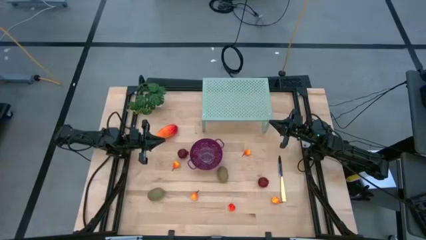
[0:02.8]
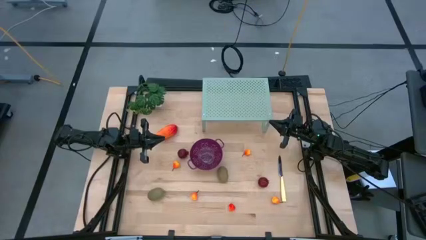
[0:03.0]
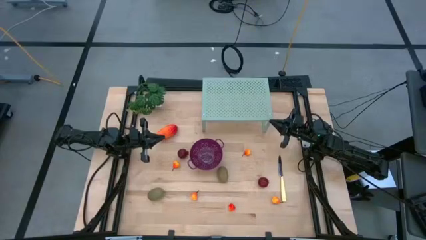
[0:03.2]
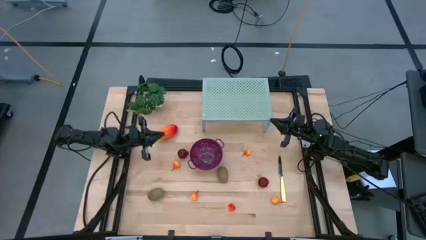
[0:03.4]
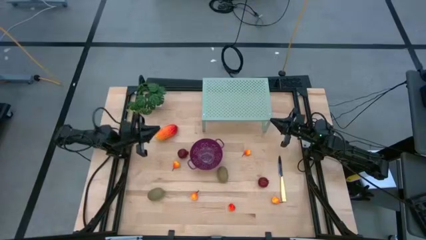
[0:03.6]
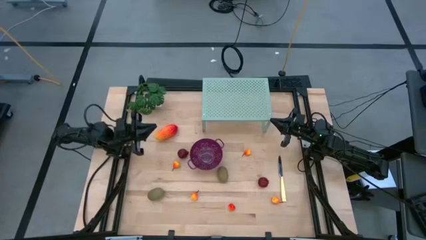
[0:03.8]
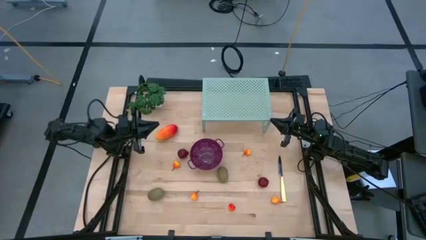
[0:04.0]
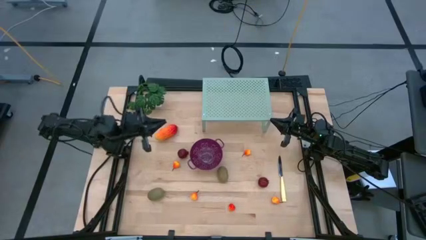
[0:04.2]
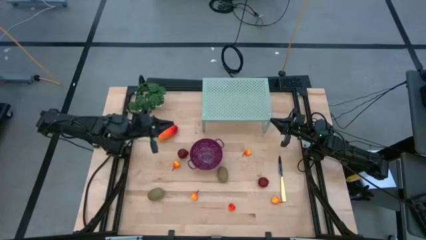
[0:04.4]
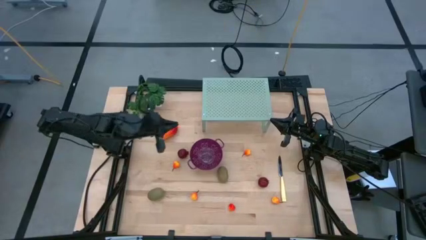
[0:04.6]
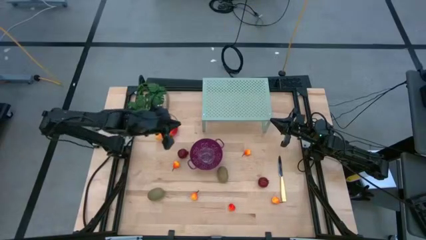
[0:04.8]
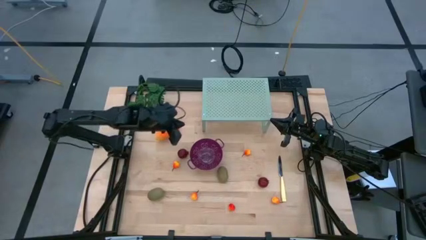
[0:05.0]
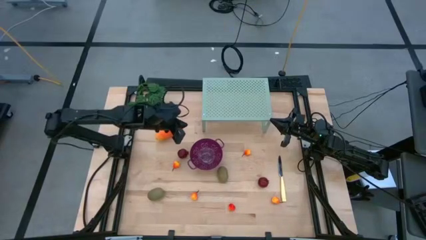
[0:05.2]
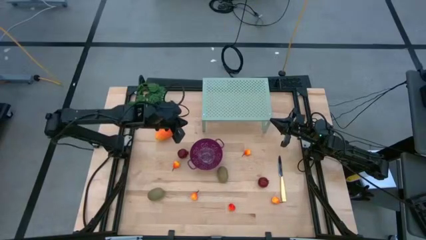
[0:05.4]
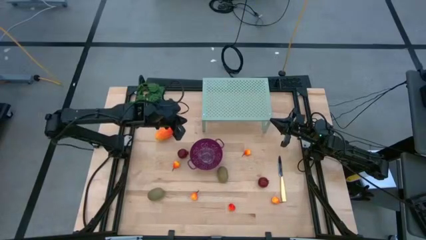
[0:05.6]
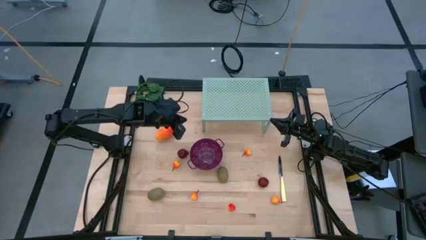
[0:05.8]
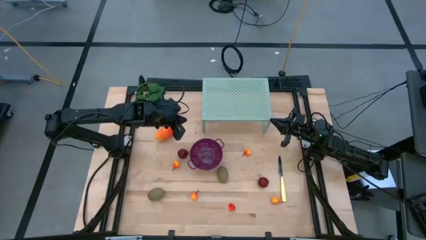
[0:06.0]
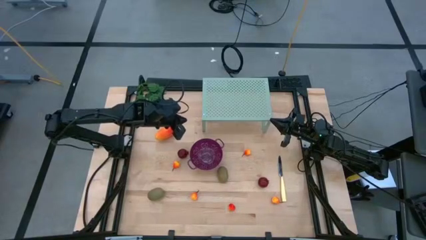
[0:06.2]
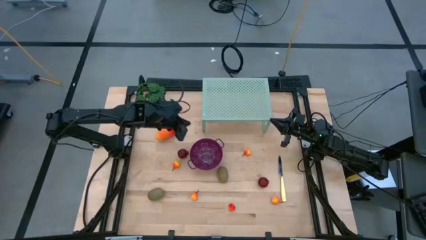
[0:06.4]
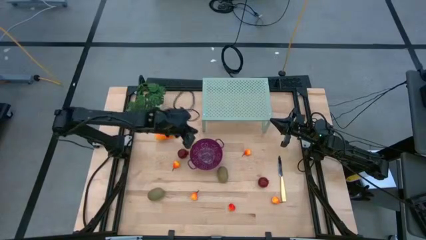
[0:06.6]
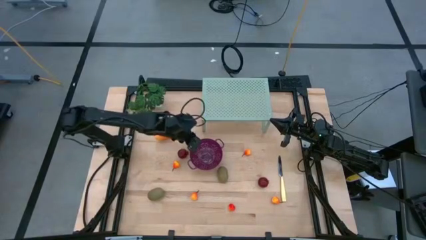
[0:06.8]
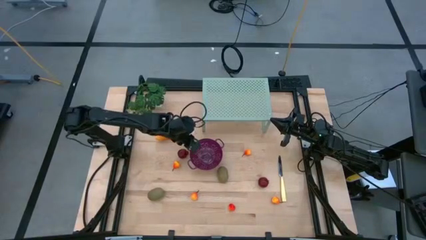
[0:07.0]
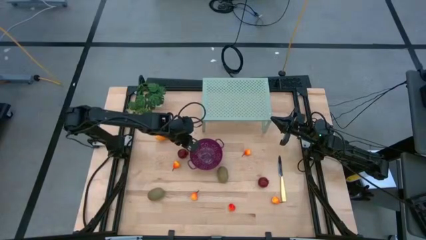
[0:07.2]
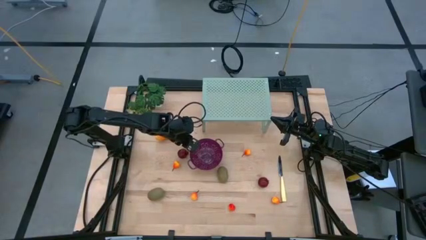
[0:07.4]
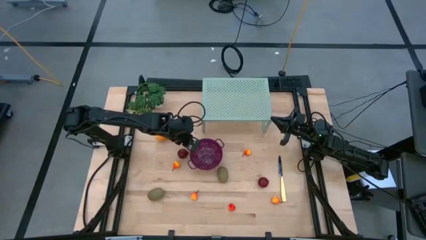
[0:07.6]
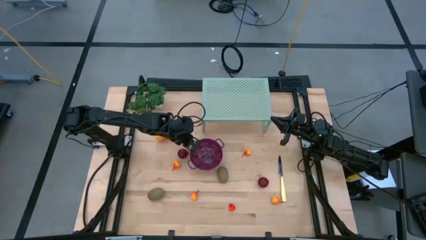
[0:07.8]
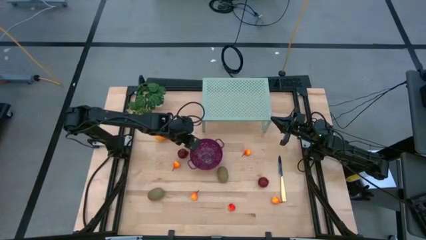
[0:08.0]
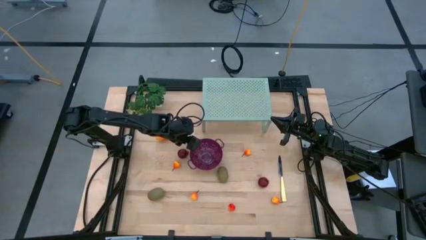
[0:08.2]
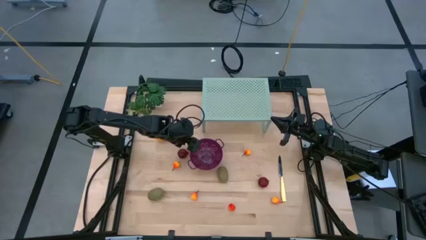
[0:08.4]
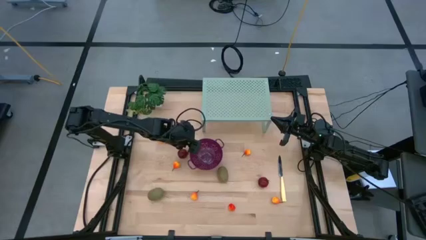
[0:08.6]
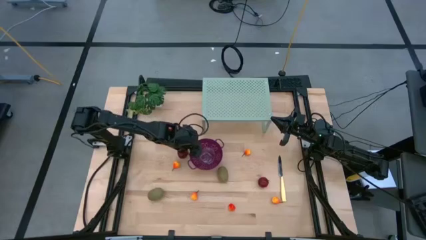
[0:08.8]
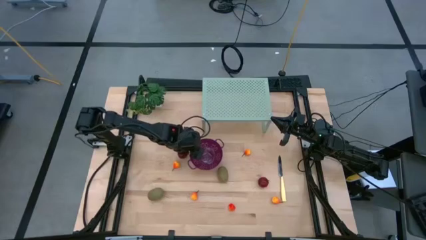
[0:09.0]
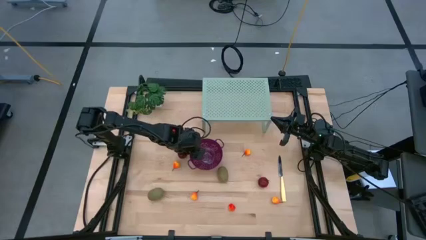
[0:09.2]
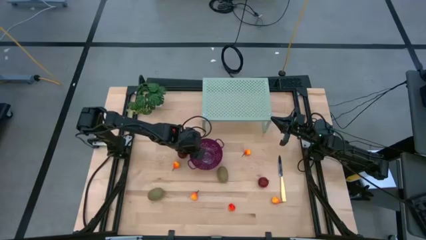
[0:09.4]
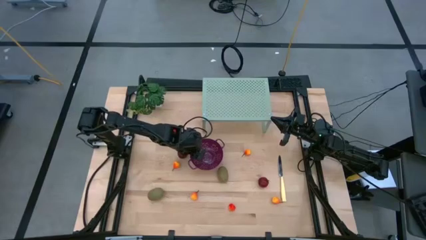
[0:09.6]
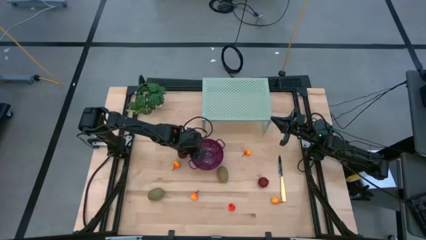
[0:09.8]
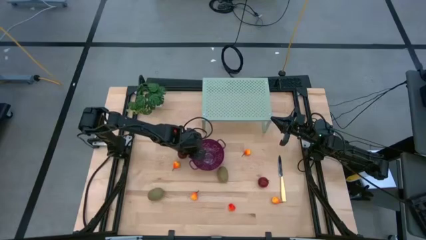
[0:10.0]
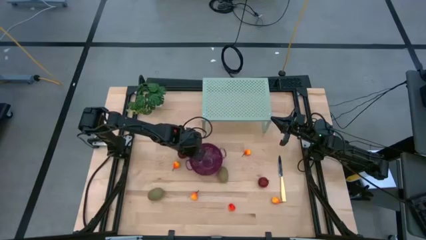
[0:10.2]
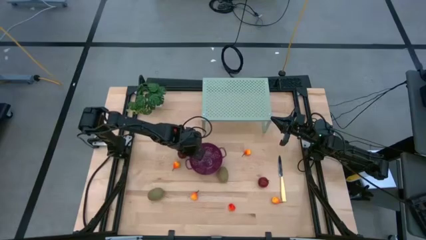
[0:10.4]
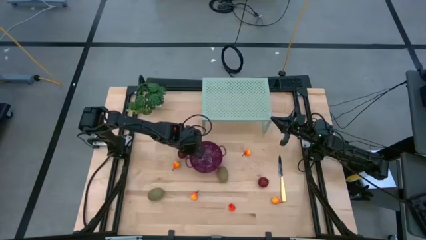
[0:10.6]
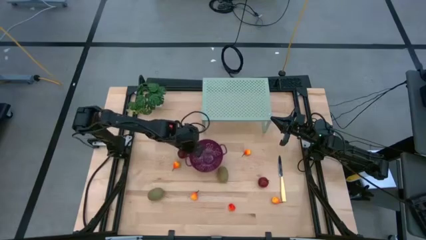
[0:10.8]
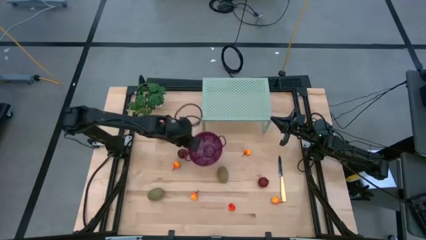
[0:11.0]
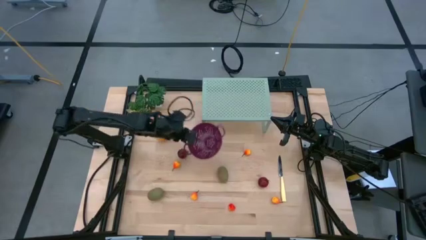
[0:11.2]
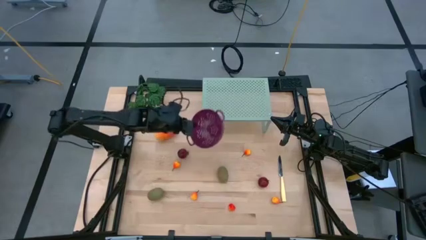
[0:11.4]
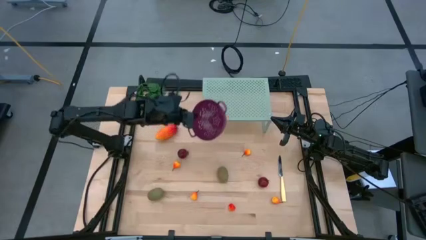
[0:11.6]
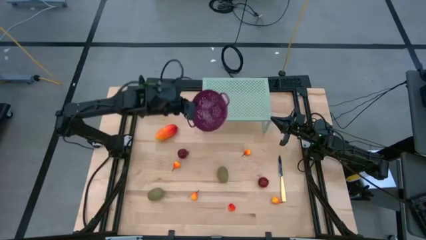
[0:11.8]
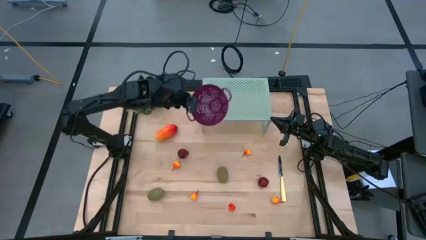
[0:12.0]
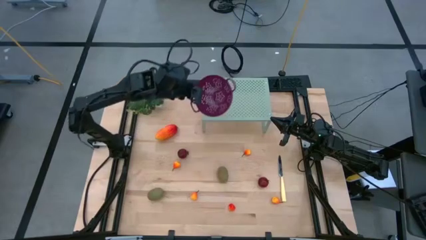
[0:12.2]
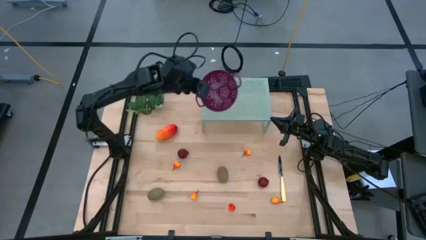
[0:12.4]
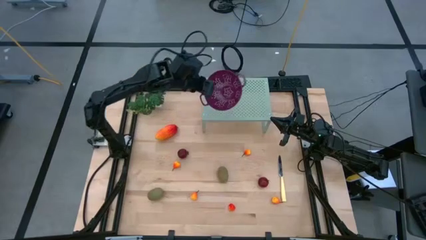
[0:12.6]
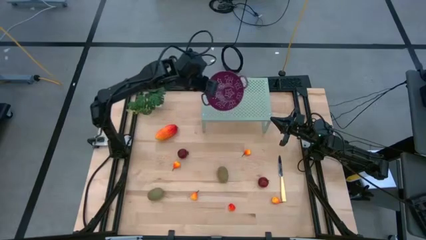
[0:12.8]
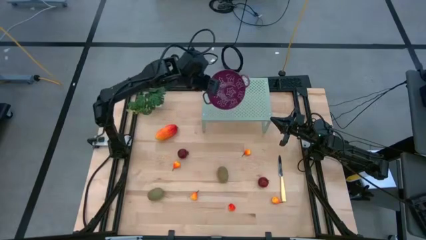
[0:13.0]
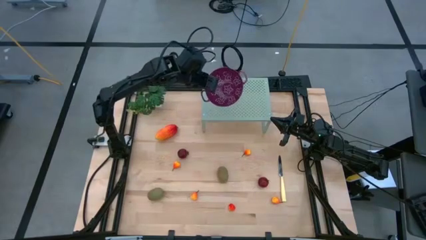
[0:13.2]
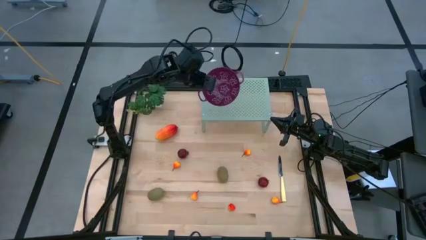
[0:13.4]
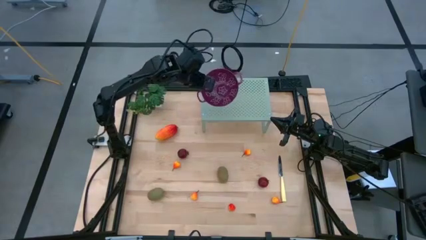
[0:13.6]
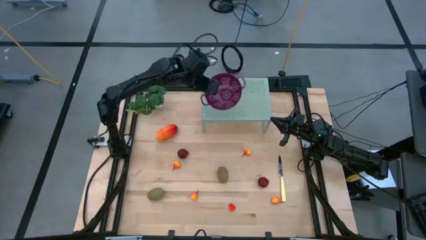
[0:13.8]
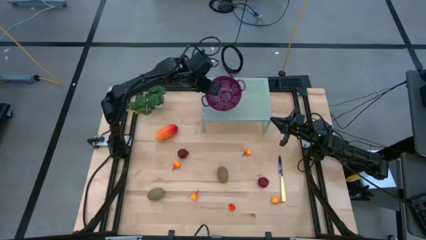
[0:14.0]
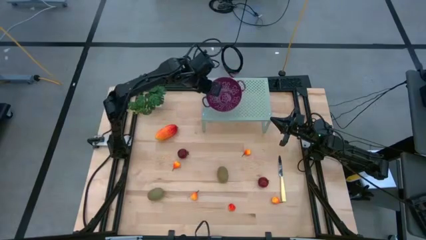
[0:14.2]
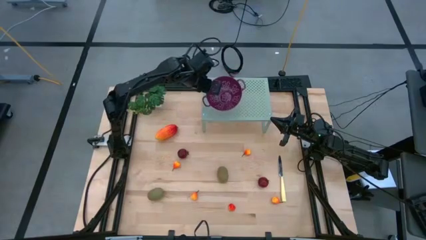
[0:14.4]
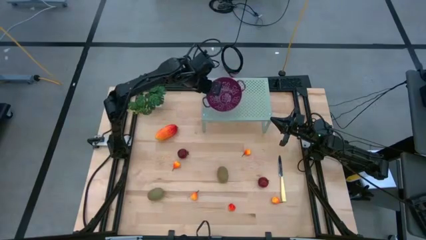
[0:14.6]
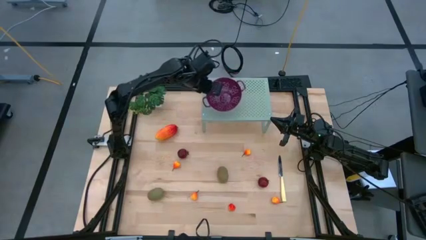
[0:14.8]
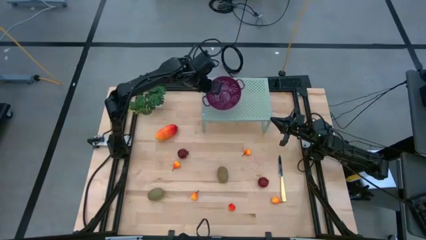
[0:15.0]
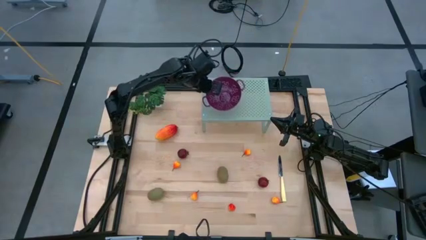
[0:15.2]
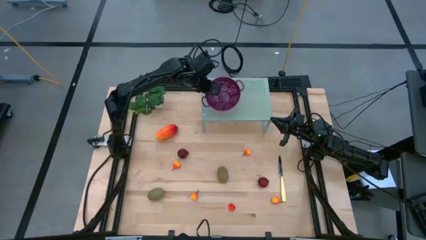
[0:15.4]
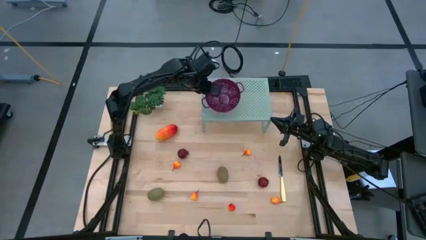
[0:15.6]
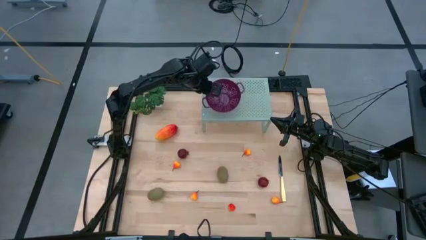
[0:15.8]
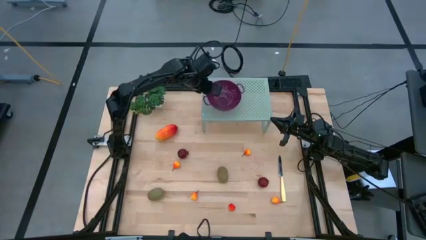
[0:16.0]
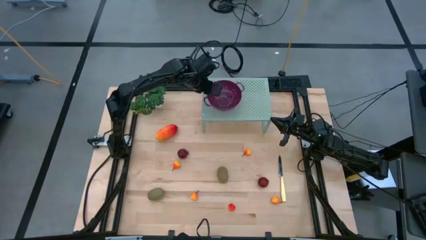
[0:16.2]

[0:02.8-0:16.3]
Task: Pick & Place Fruit
Put the violet strainer bowl on the shelf
